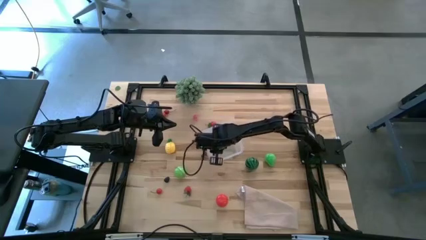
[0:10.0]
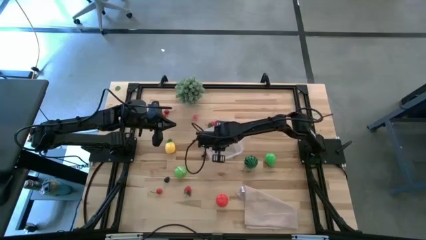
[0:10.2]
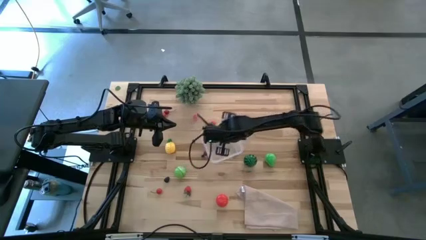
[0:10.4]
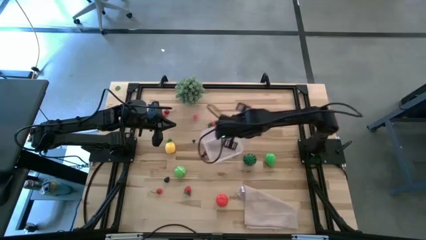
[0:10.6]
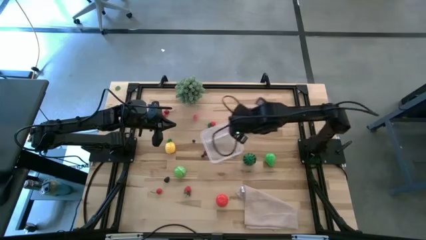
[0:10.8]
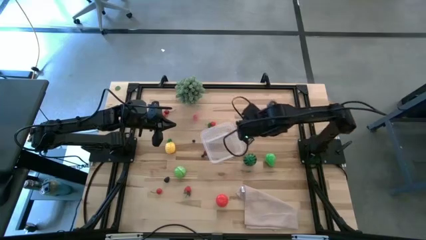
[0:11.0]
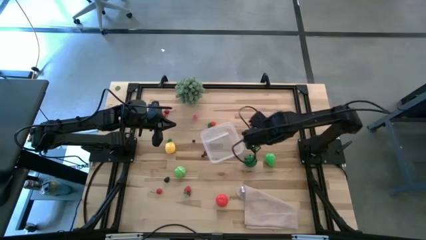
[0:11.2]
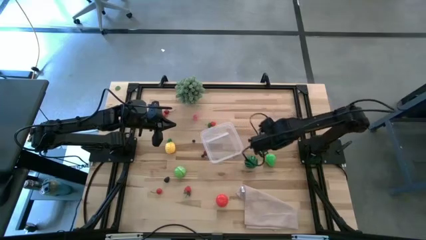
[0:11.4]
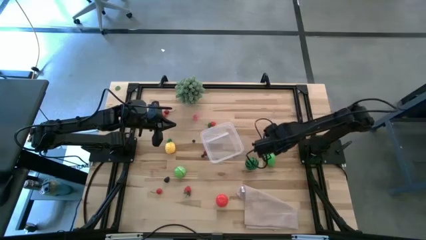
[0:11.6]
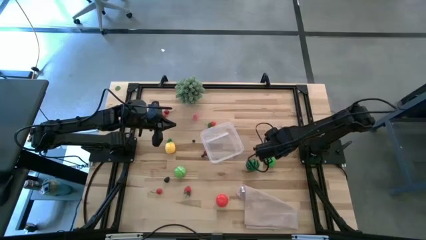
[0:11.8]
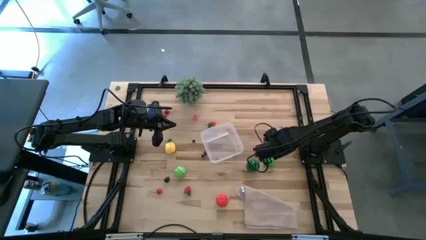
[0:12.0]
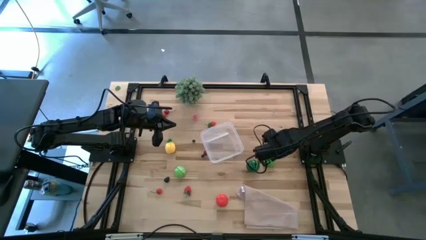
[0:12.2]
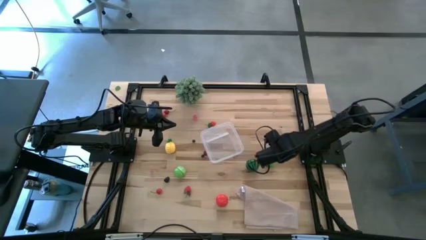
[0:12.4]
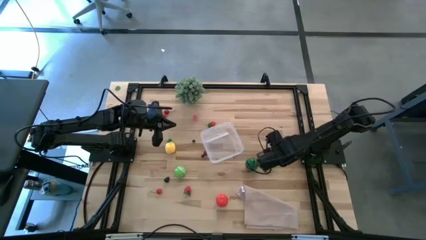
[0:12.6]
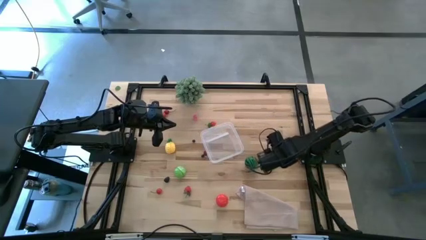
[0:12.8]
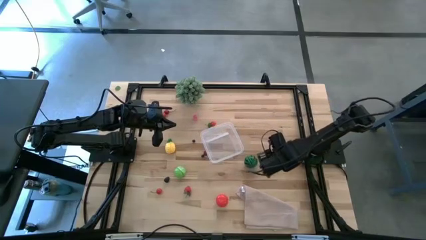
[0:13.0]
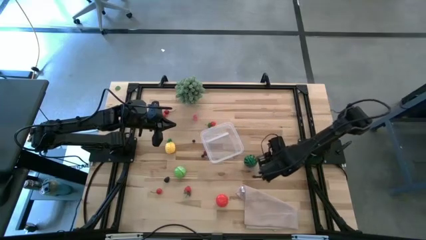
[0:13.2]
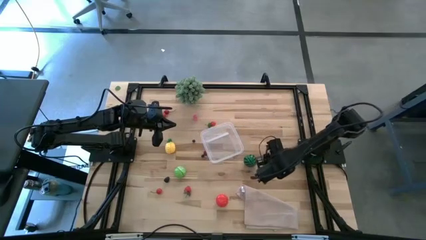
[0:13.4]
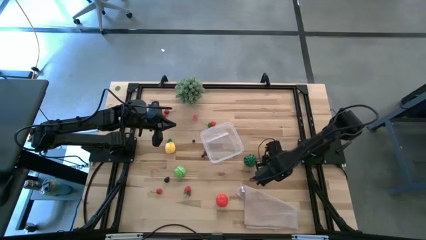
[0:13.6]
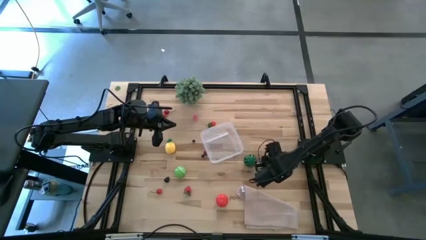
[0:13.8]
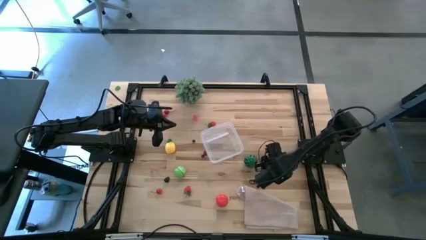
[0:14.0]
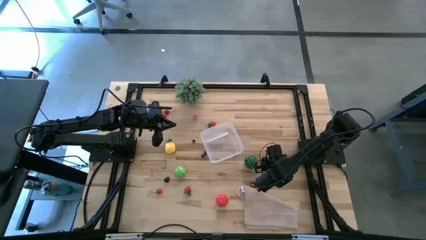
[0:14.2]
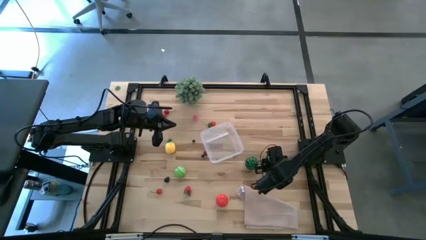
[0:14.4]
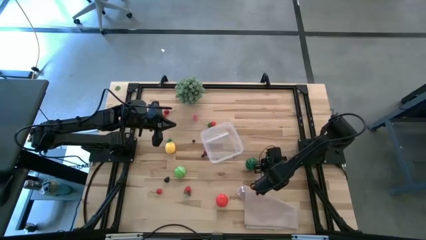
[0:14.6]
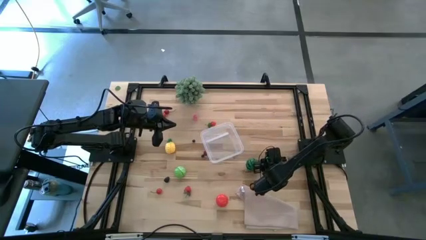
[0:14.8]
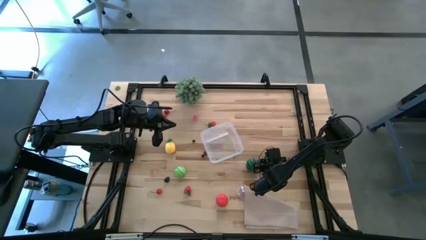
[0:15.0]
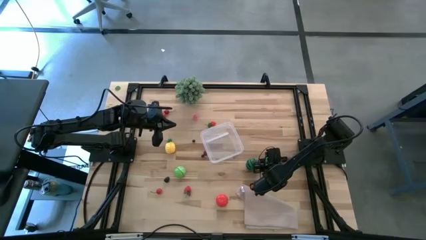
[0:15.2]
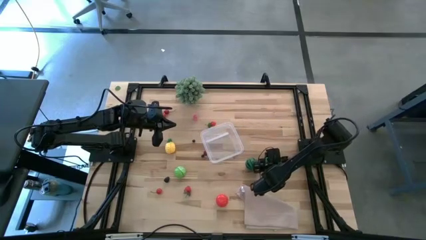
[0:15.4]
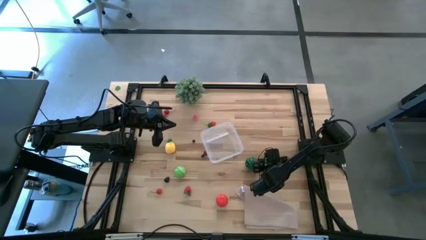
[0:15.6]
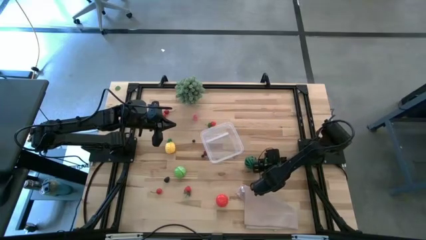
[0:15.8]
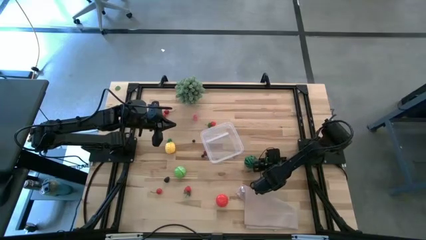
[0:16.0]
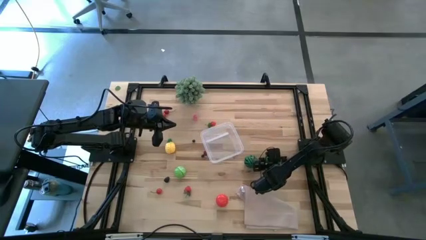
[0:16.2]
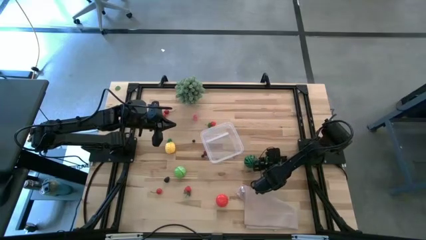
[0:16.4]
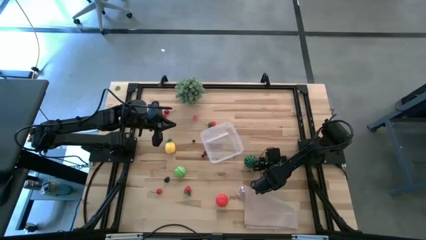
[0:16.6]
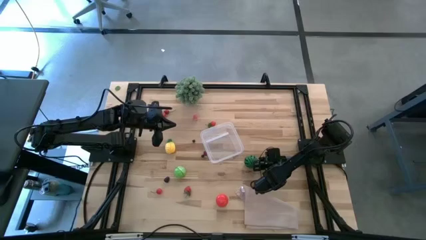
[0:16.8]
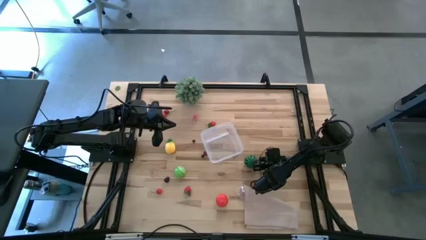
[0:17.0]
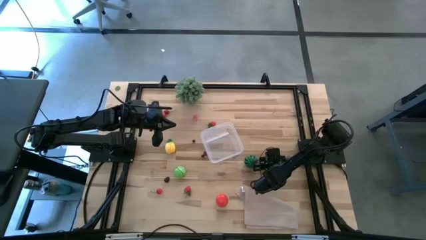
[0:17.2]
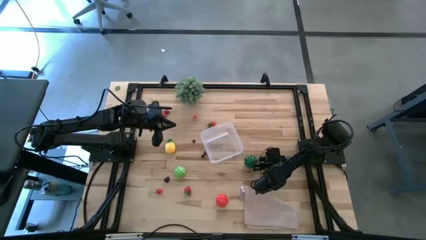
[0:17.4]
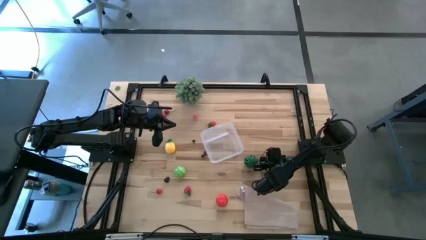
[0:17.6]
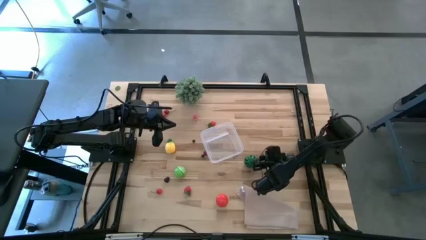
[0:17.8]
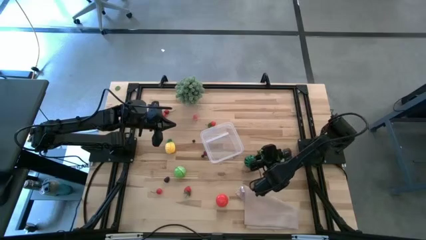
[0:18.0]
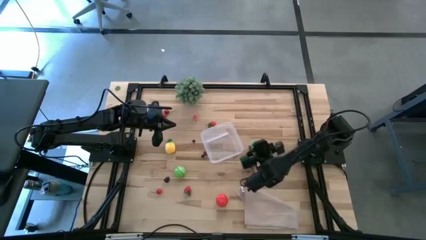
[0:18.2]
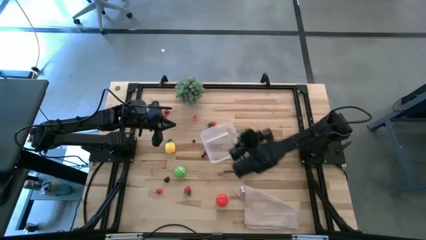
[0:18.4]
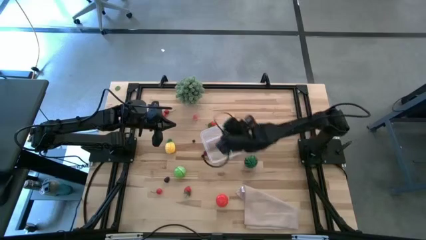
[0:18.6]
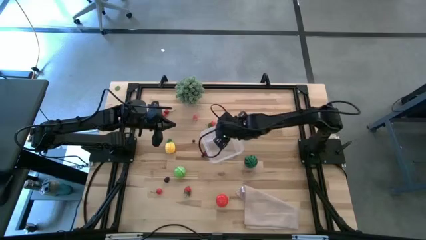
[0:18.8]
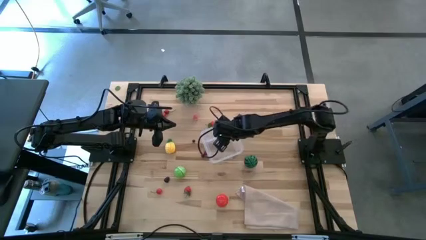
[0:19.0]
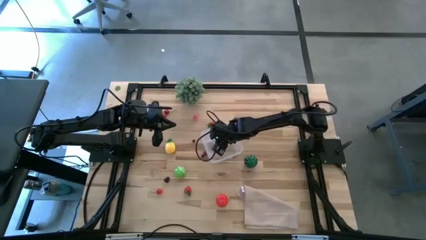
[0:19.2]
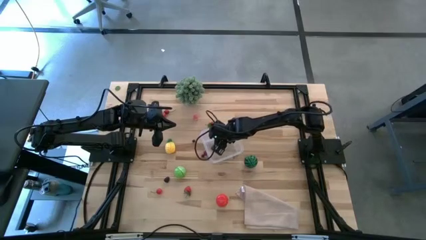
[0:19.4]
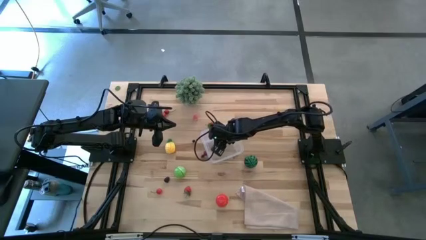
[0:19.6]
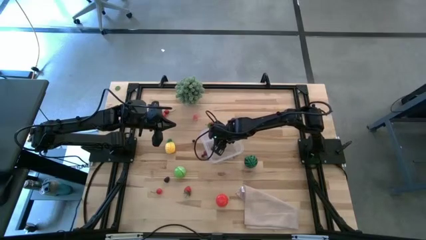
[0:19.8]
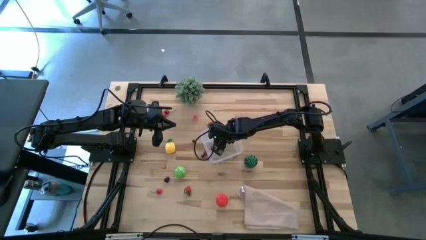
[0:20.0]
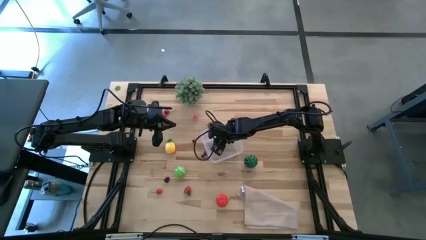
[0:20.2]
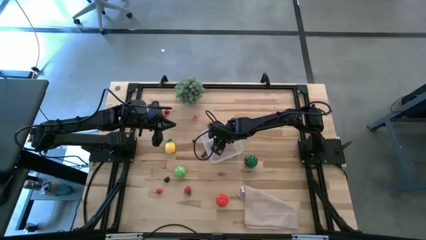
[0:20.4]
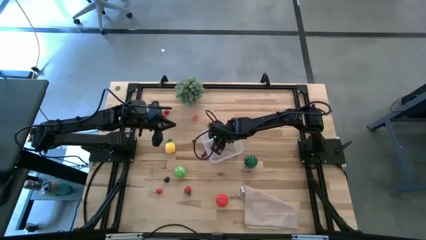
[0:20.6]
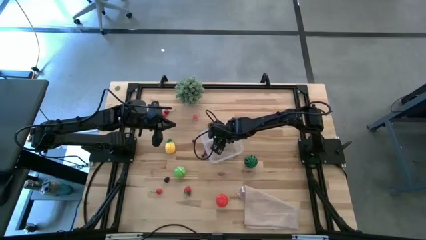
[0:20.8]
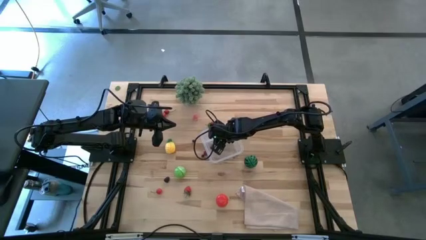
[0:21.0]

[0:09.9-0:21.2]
Task: Pick and placing Produce into tupperware
Put the green pear into the transparent bin

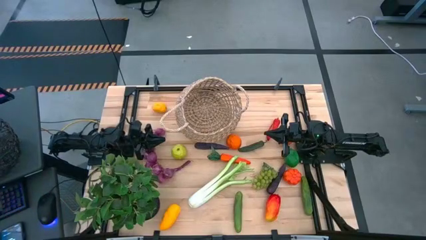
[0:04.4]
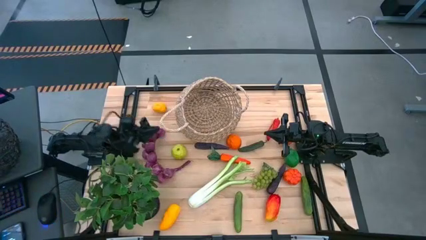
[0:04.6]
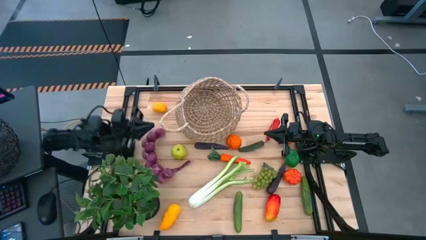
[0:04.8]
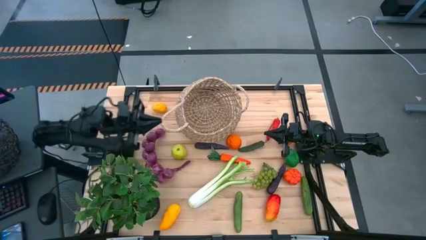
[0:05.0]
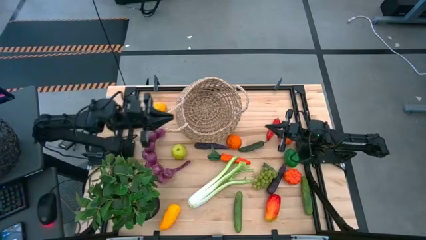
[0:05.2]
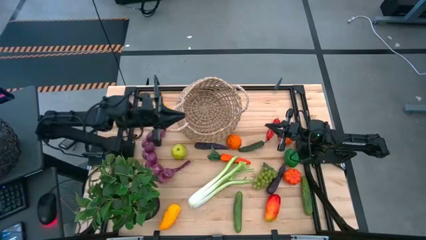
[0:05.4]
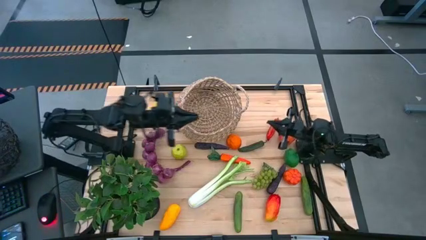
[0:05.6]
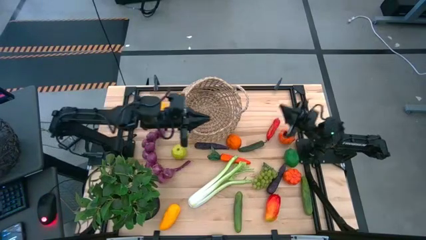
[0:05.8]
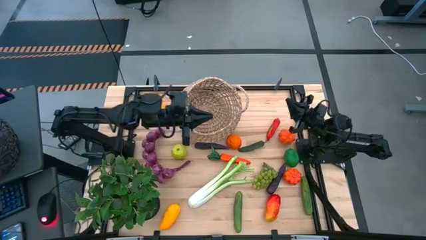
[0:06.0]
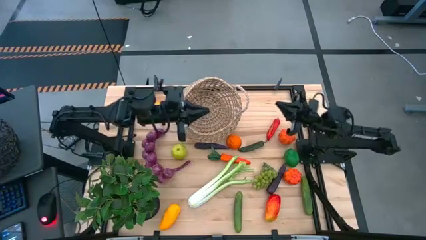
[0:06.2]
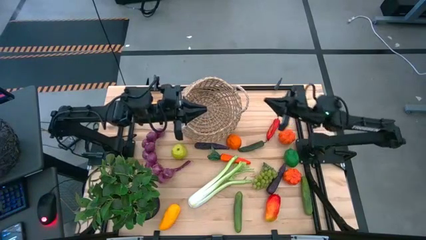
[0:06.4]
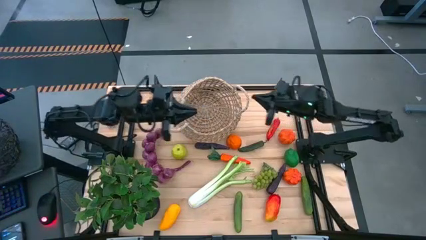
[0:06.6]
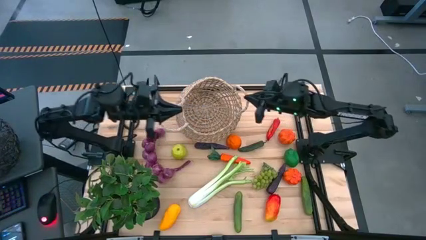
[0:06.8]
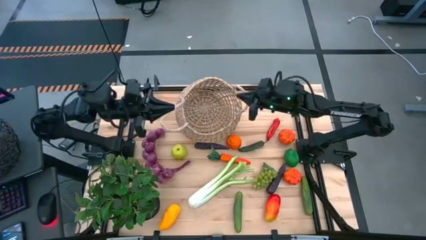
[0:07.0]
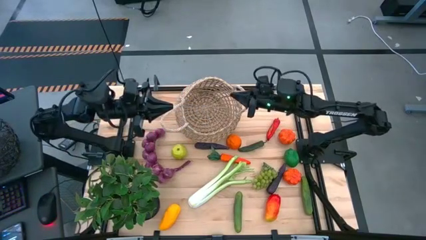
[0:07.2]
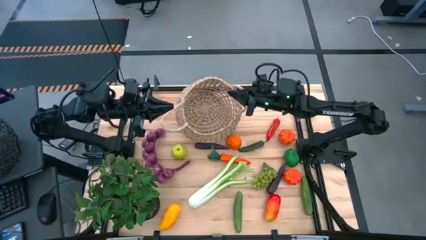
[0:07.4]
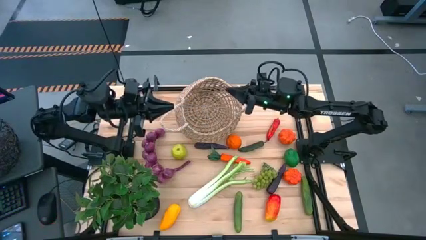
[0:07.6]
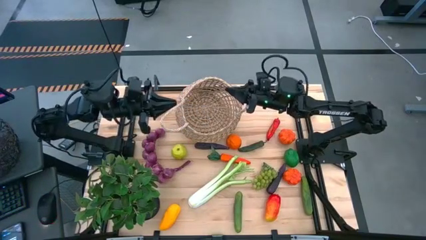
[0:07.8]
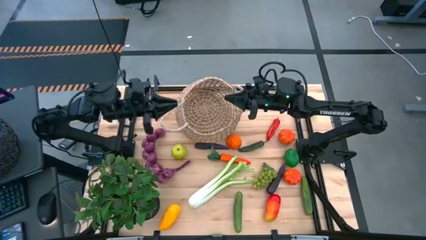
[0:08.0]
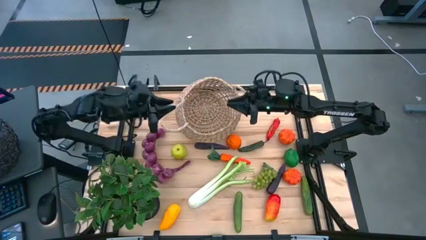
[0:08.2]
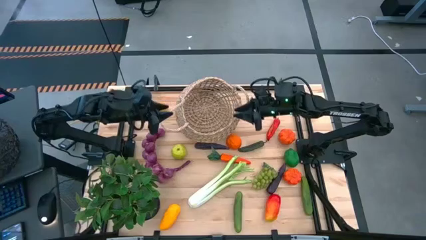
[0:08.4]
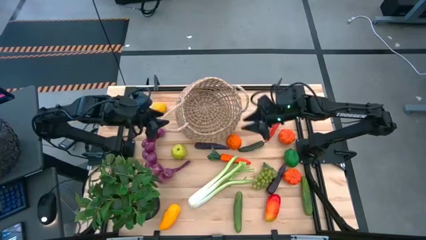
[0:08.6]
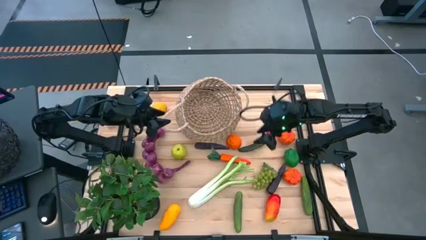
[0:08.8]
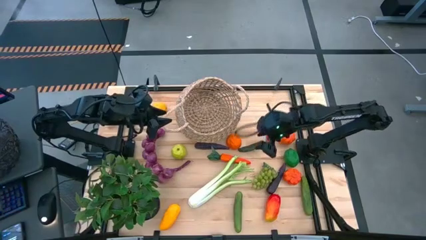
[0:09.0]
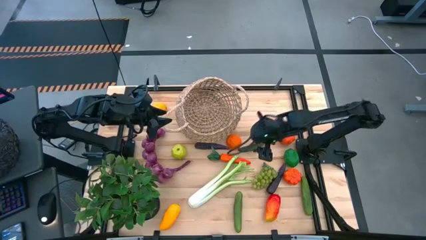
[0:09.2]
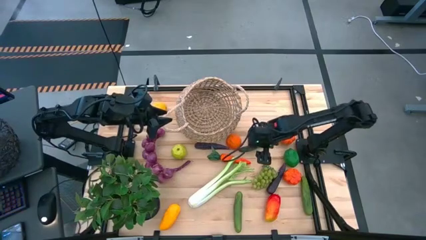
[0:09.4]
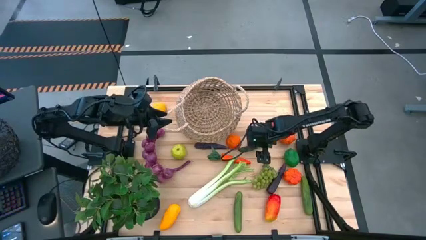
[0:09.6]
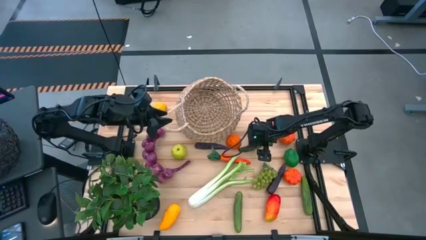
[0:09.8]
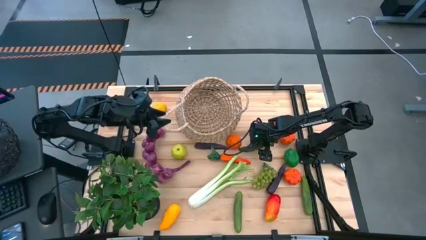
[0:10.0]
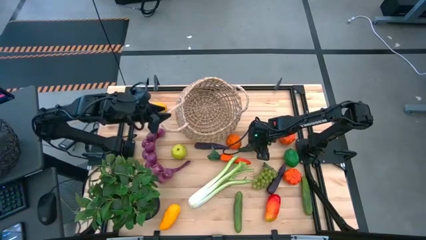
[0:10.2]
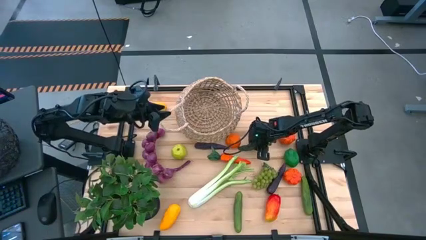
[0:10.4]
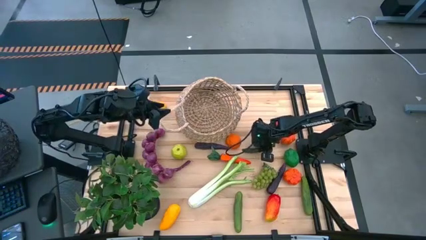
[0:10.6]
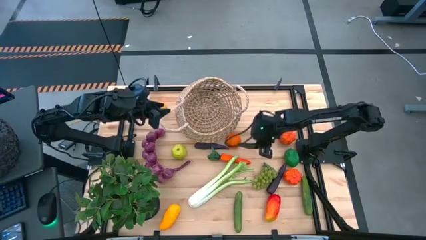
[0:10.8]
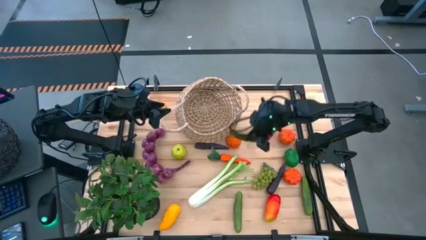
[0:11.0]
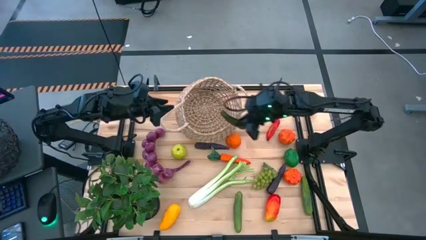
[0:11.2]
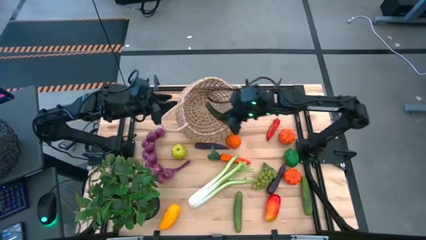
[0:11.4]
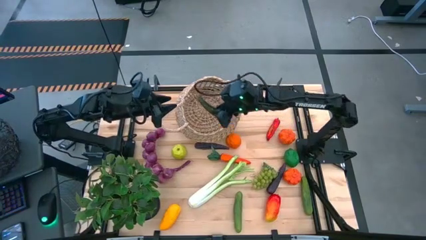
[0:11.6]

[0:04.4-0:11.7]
Task: Build produce basket
Put the green chili pepper into the brown basket
